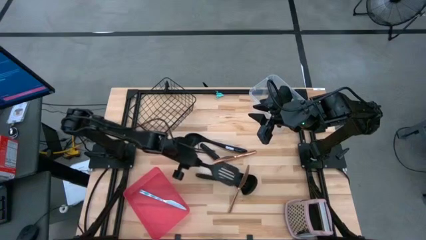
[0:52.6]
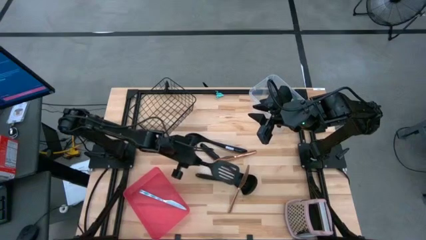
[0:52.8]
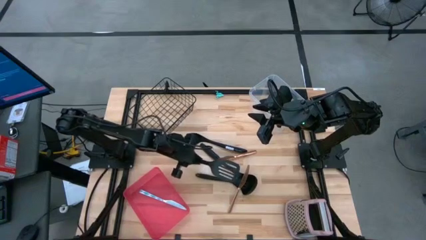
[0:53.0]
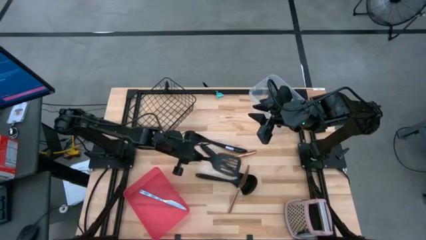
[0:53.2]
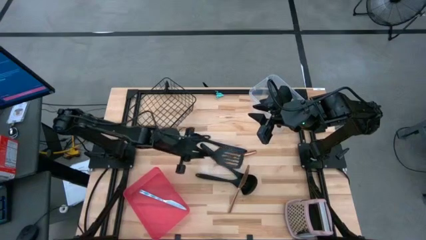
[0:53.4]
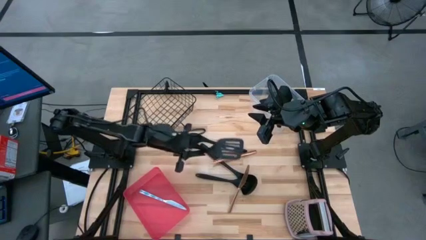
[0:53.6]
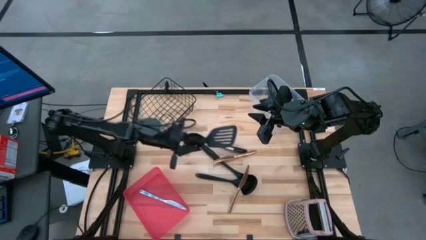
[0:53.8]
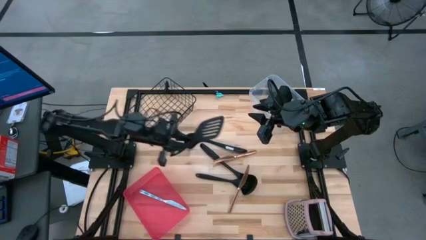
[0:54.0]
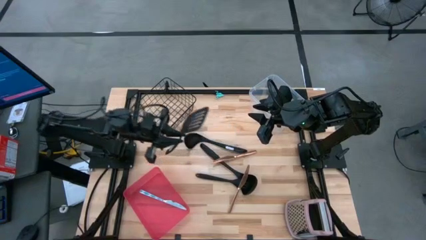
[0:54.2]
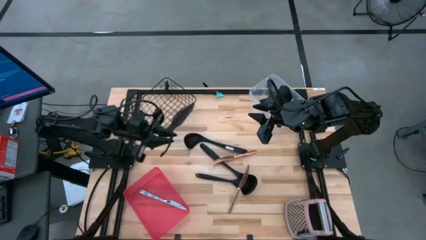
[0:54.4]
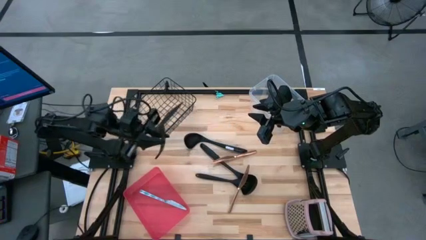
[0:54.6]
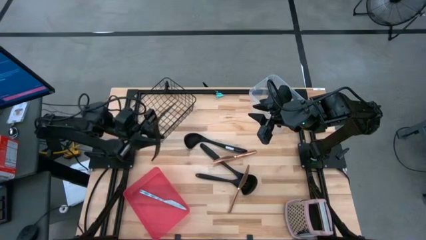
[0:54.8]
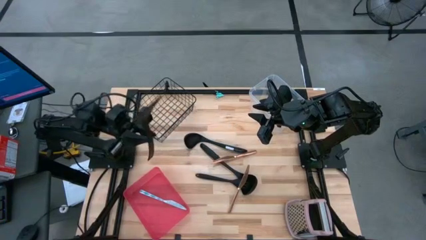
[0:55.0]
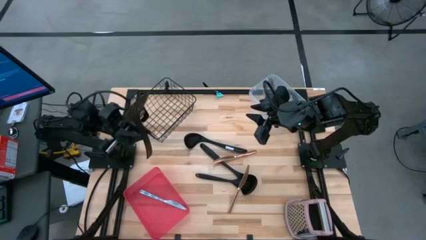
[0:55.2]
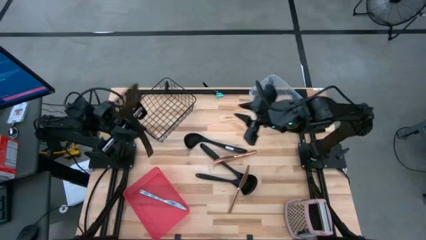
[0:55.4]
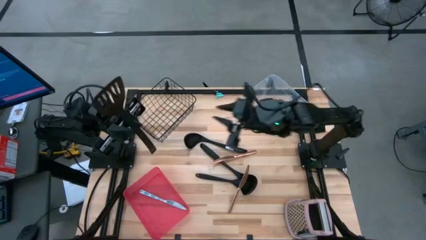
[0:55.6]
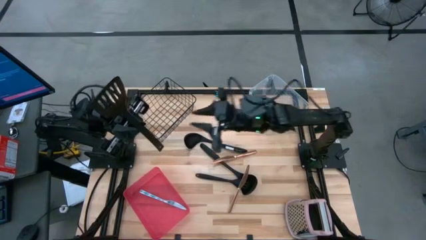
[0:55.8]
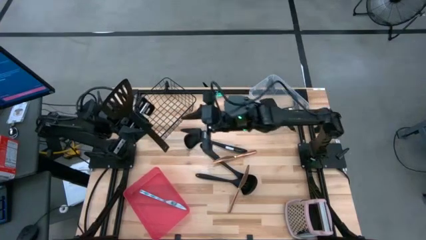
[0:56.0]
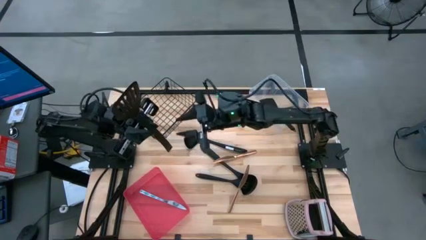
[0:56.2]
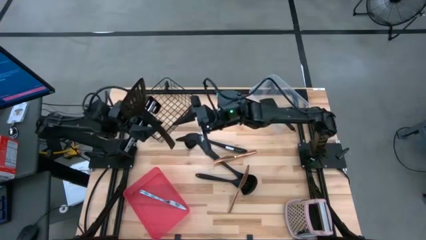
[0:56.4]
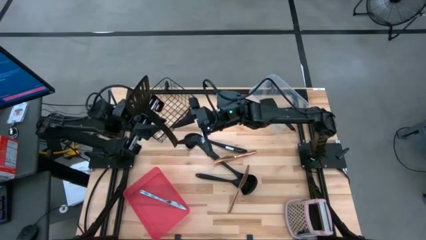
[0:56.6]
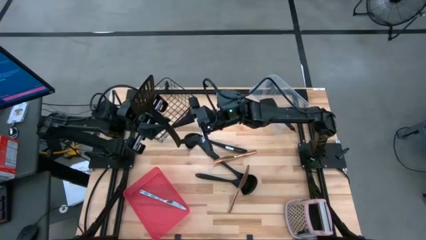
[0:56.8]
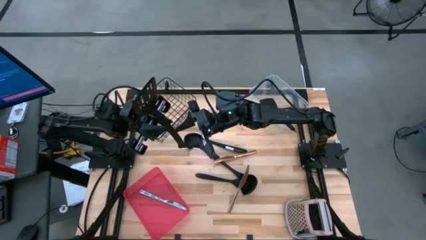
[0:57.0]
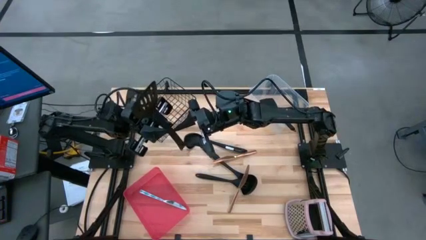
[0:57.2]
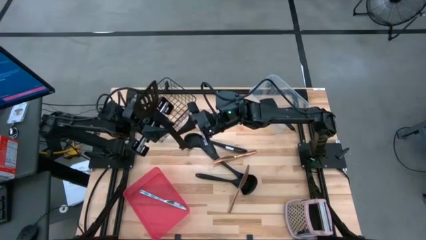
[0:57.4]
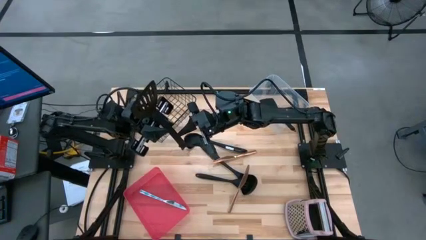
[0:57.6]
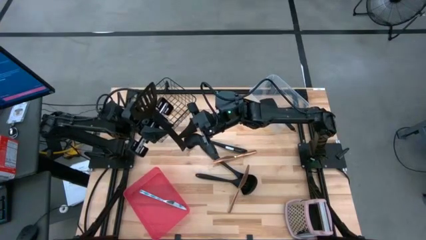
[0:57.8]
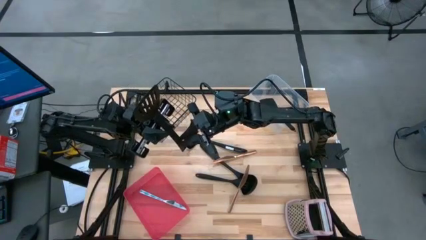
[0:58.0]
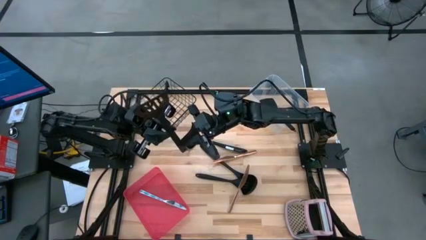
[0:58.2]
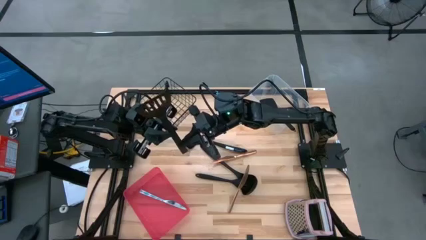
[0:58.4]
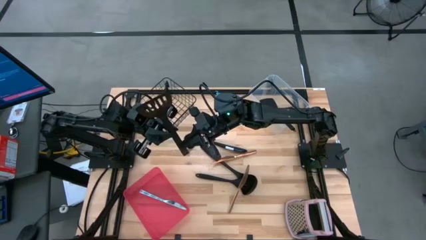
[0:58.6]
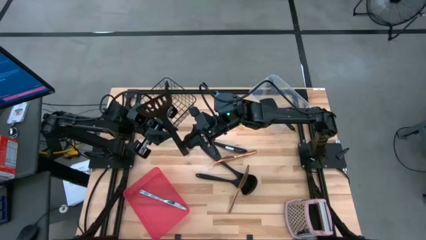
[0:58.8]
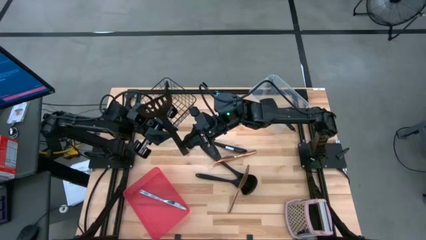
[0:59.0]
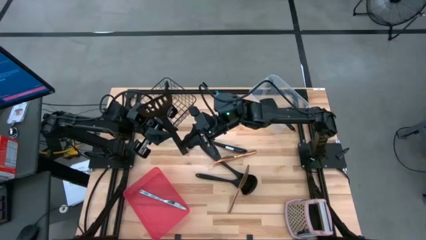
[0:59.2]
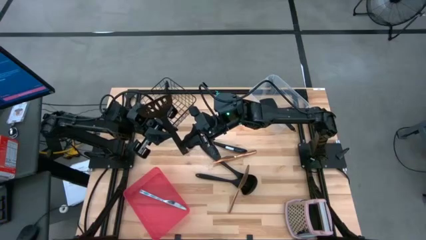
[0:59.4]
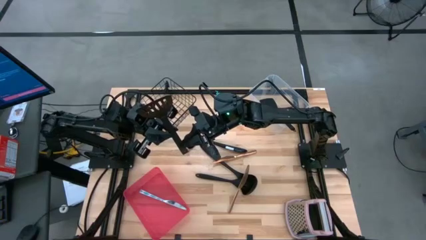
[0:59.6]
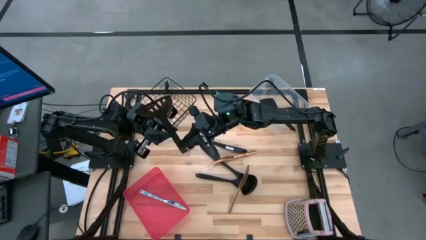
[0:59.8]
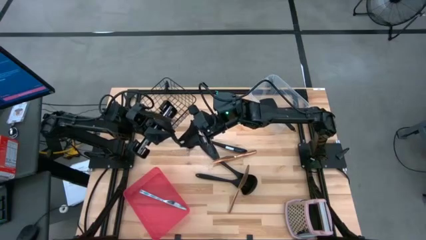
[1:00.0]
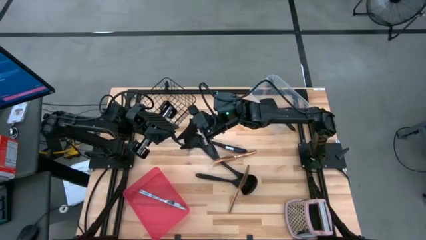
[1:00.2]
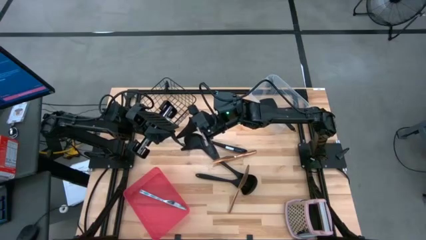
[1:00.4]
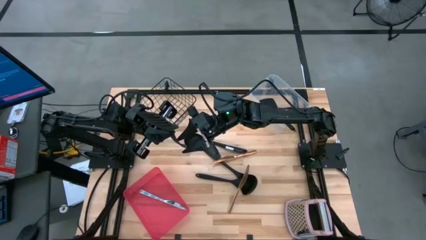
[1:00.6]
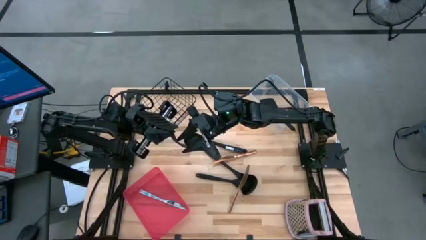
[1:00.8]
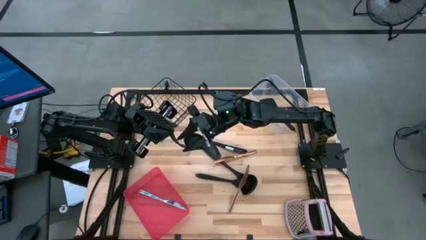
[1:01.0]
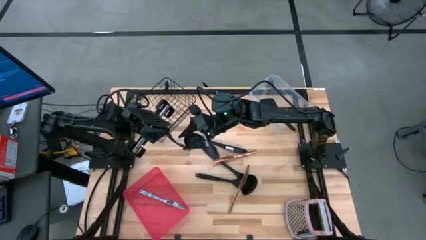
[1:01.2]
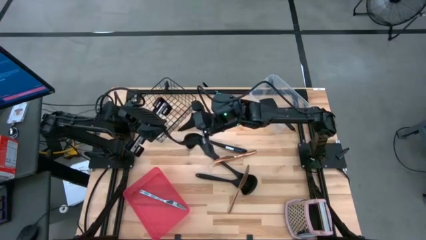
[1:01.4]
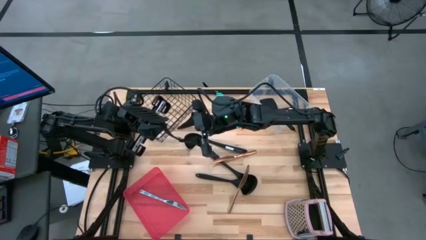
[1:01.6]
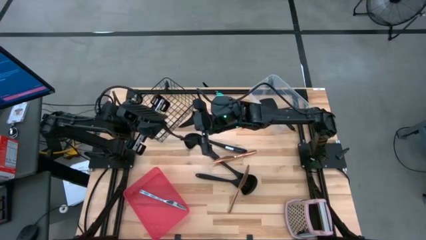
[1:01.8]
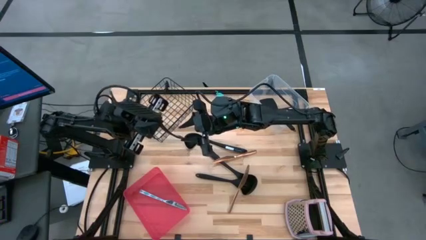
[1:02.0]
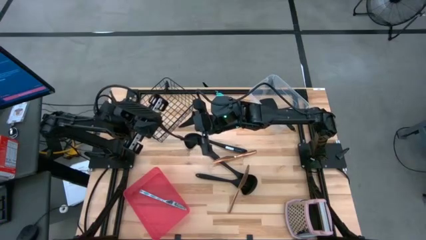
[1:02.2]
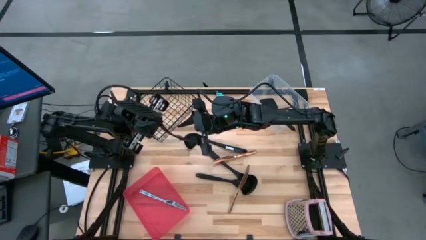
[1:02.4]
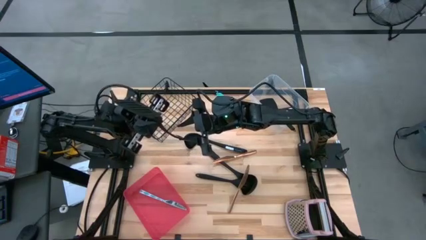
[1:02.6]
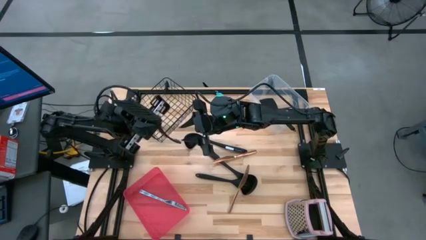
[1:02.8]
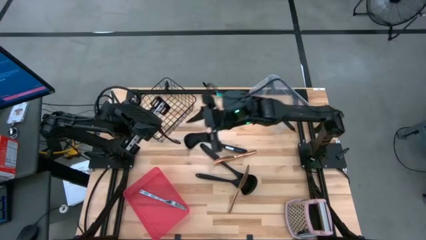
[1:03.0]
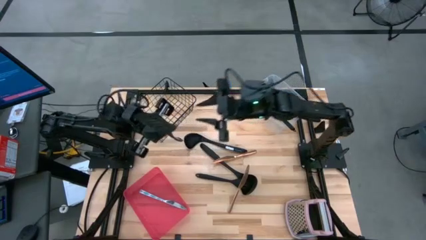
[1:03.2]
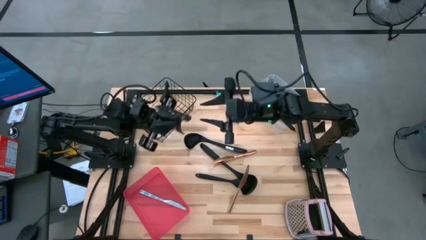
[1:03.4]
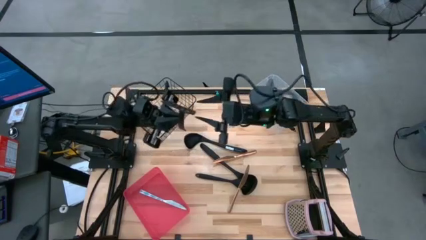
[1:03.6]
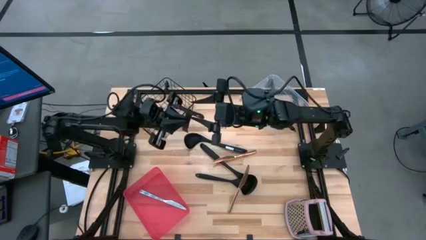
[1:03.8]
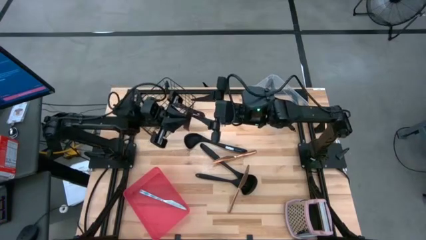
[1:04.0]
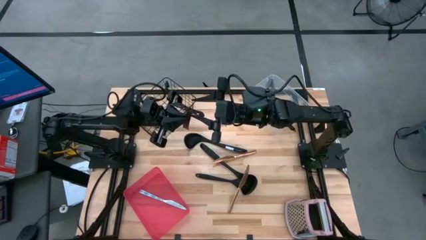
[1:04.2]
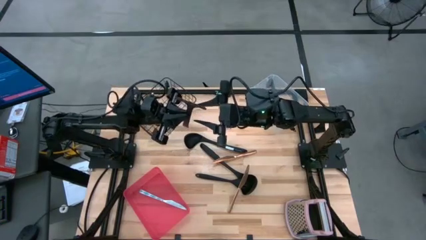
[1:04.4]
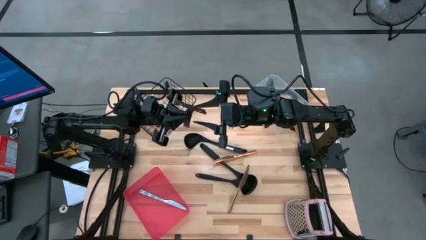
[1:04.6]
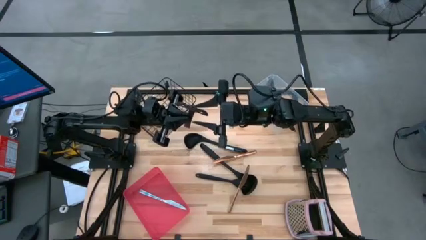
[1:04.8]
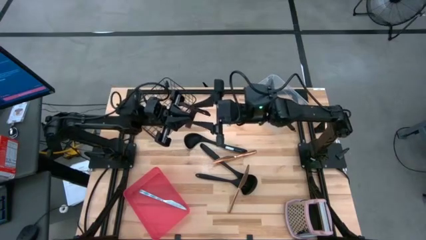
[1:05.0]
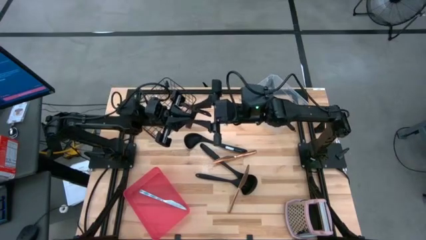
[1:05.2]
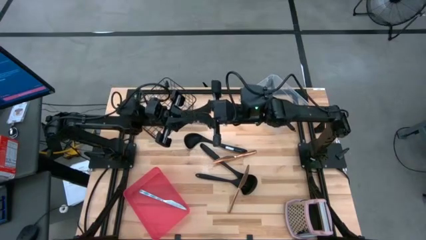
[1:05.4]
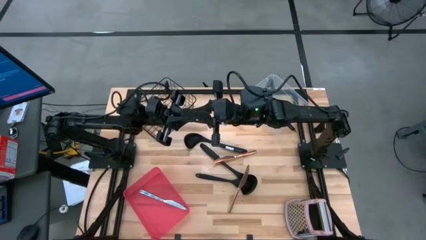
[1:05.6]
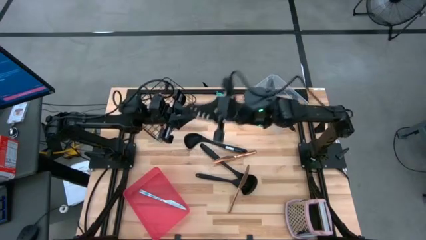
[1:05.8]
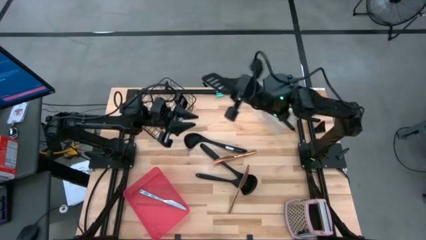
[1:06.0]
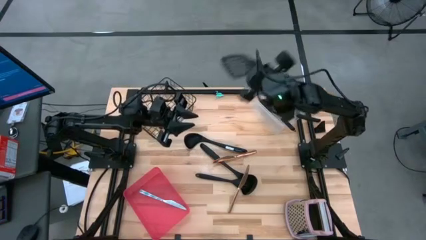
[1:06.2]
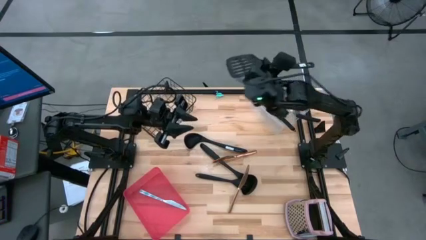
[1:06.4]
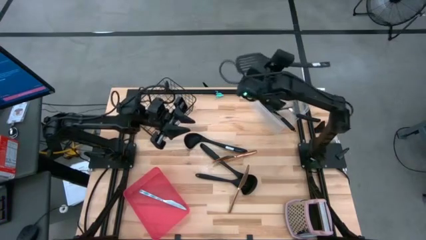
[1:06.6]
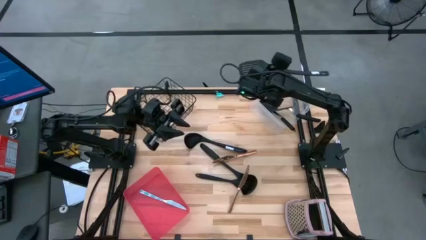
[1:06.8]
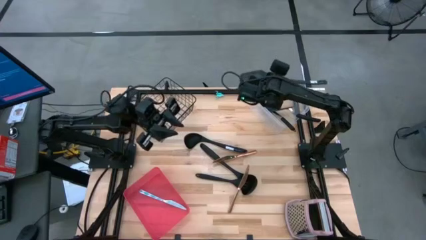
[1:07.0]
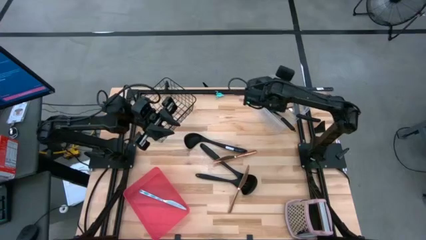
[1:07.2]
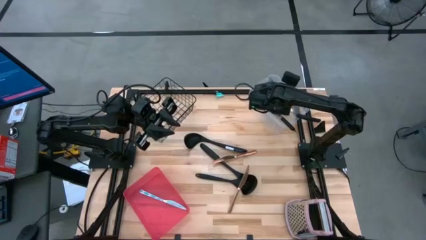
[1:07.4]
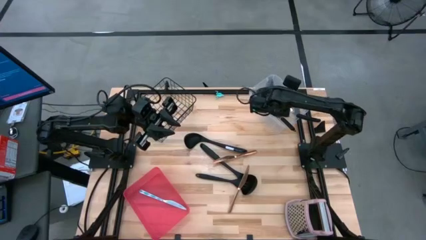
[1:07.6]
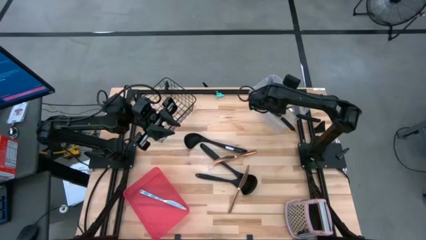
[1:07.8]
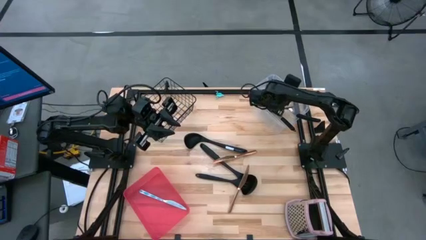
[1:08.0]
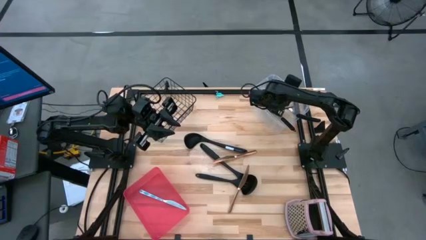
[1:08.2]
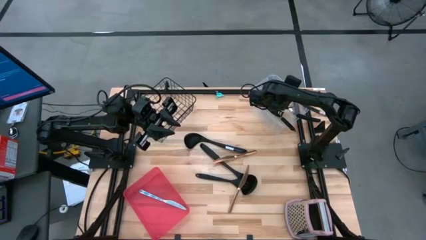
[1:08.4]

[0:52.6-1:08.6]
Task: Pick & Place Kitchen Items
Put the slotted spatula into the transparent bin

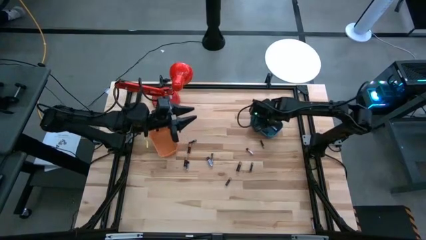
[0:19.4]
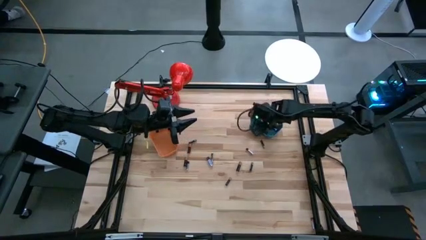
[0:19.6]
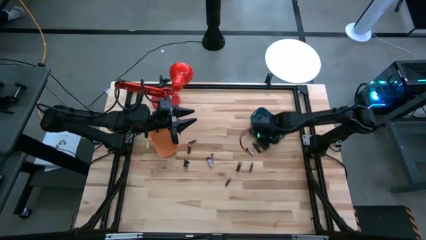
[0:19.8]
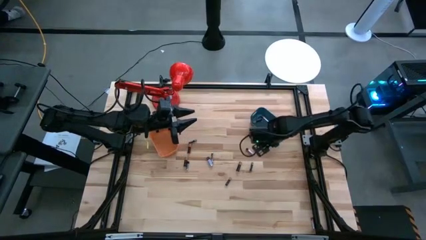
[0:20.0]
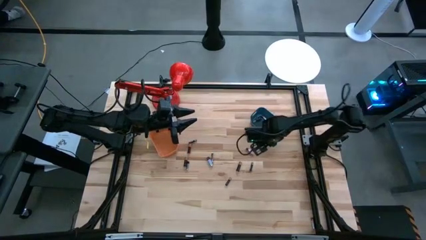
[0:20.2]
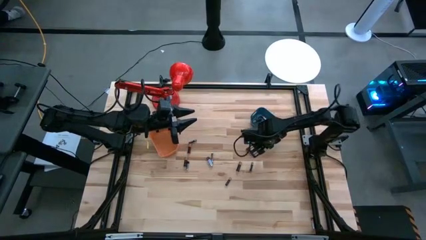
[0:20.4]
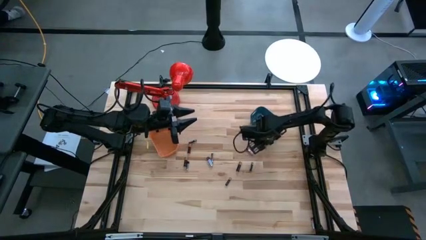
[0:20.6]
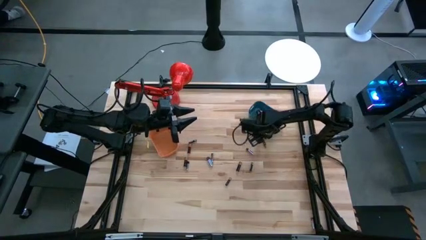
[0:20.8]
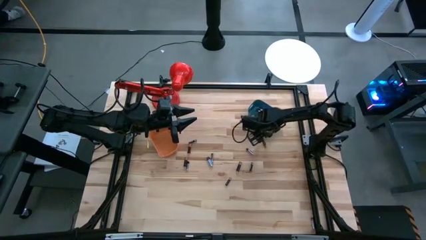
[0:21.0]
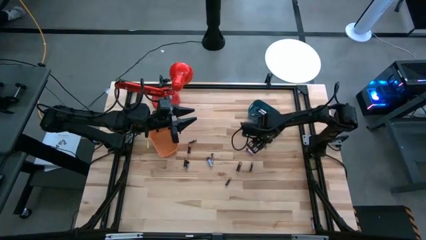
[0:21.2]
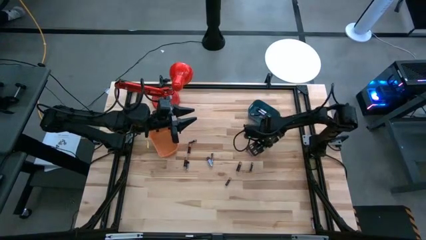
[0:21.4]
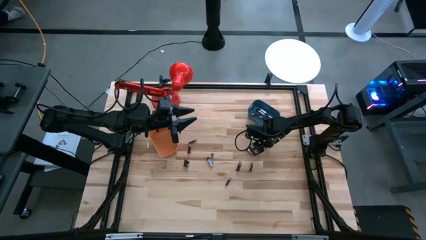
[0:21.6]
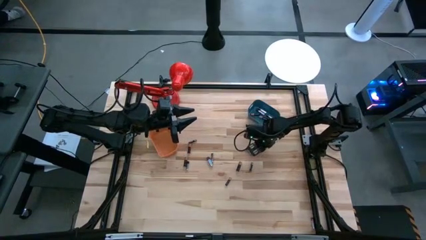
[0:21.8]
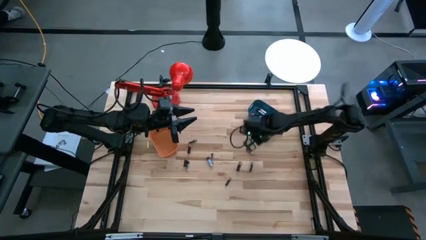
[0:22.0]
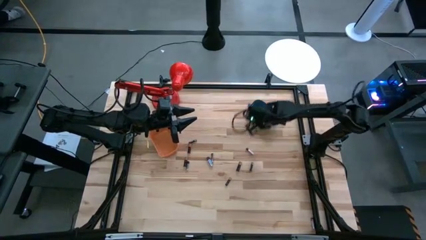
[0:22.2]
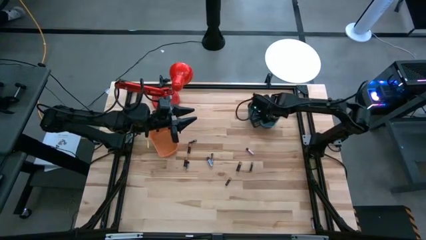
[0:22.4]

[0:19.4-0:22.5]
Task: Sort batteries
Put the black battery into the blue bin
